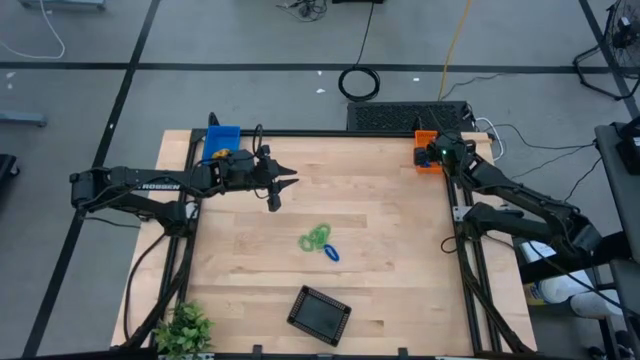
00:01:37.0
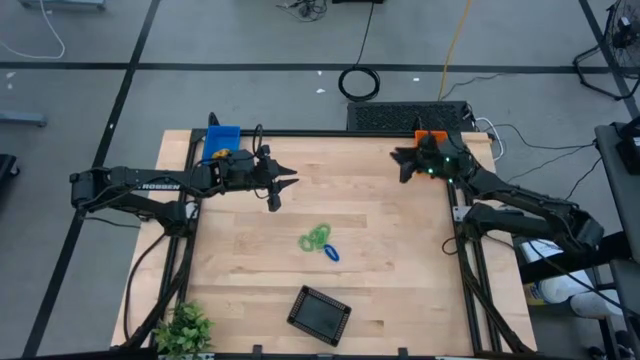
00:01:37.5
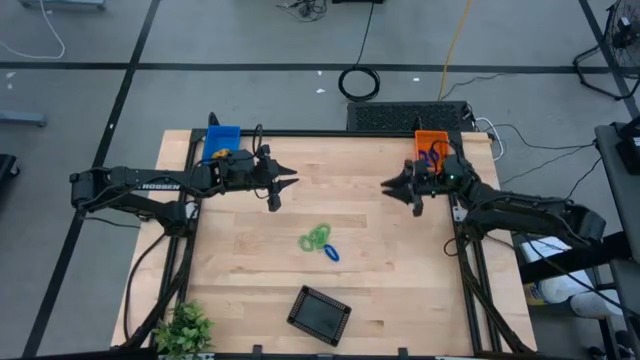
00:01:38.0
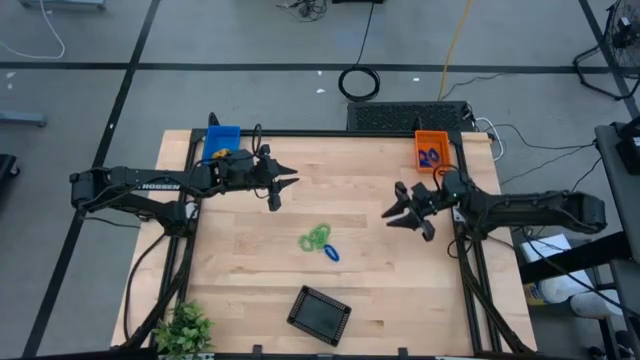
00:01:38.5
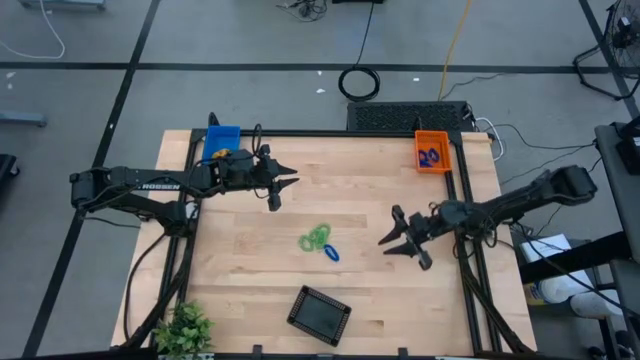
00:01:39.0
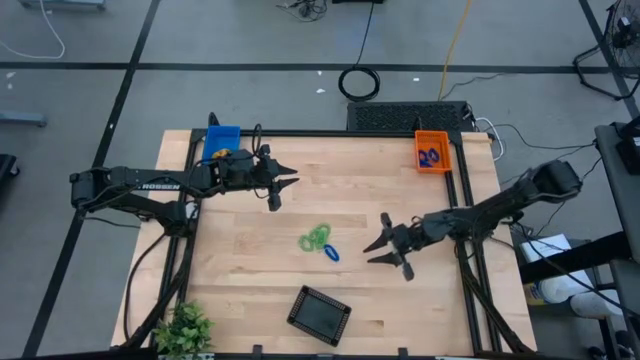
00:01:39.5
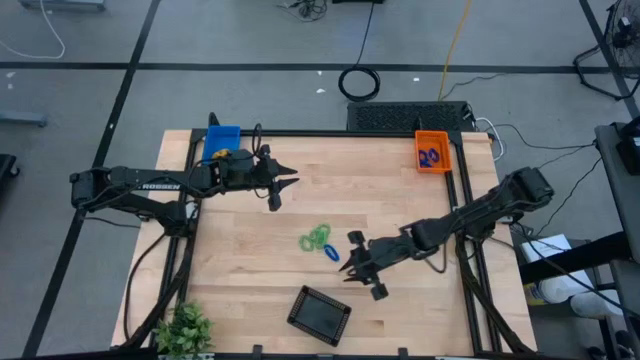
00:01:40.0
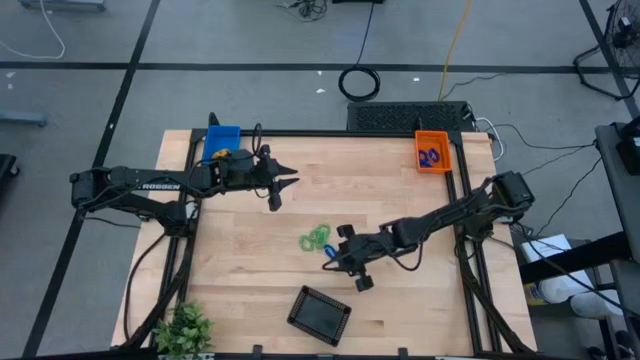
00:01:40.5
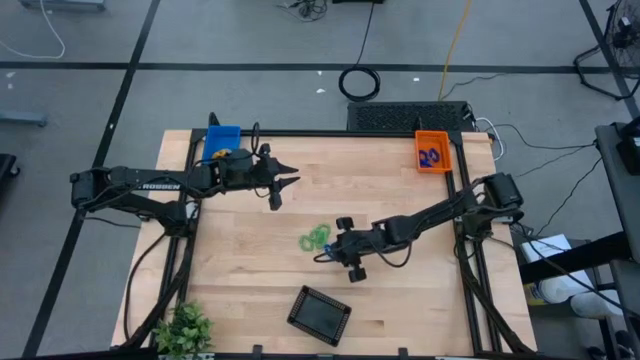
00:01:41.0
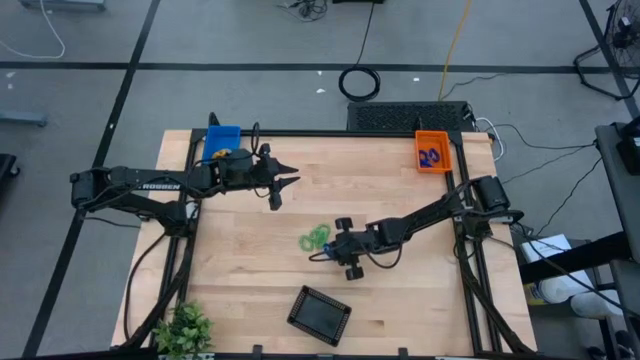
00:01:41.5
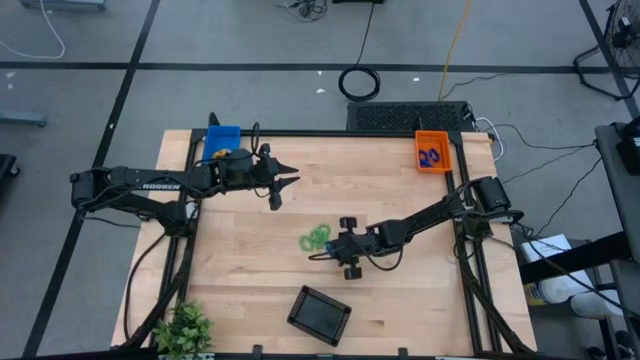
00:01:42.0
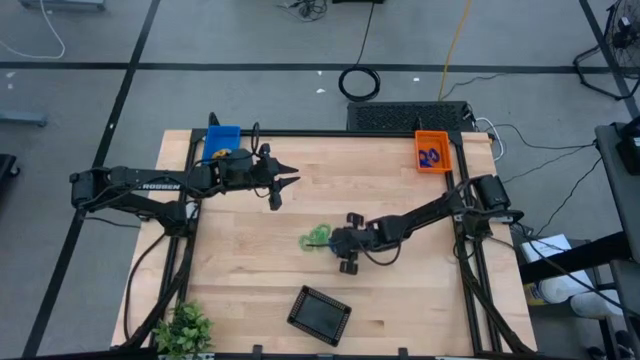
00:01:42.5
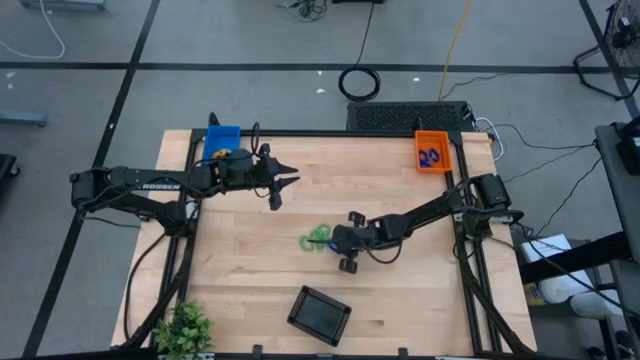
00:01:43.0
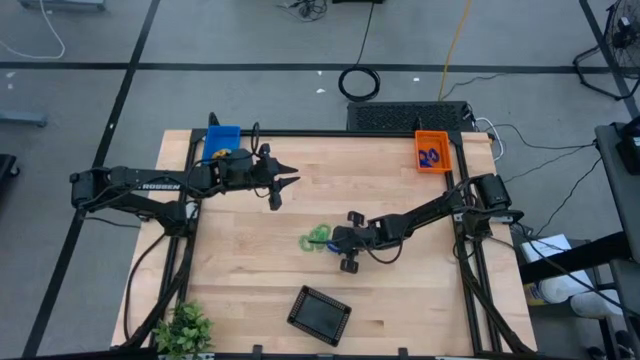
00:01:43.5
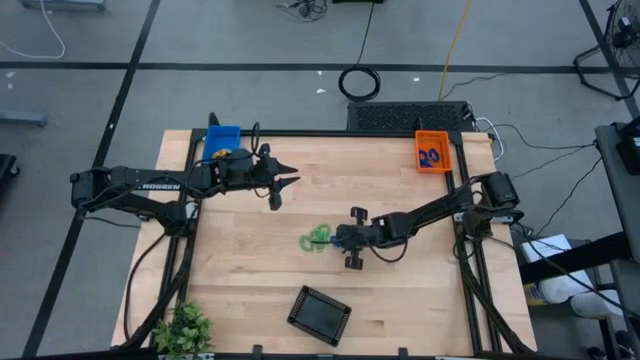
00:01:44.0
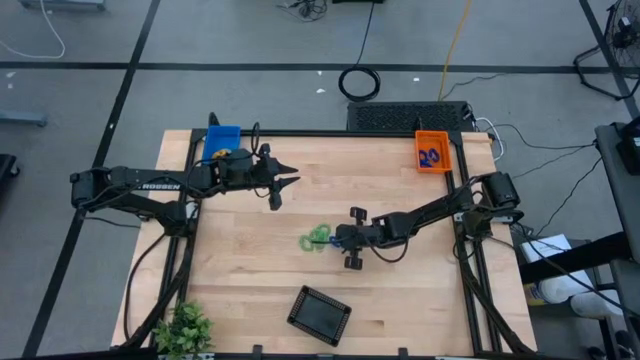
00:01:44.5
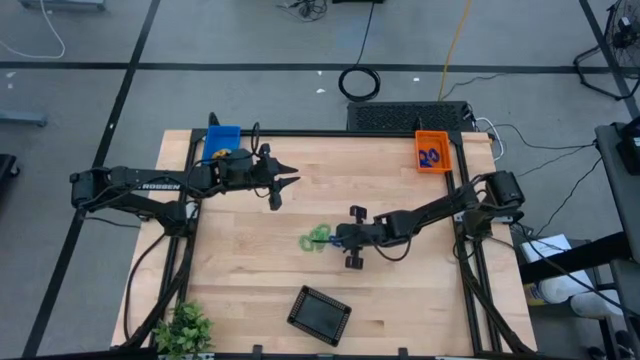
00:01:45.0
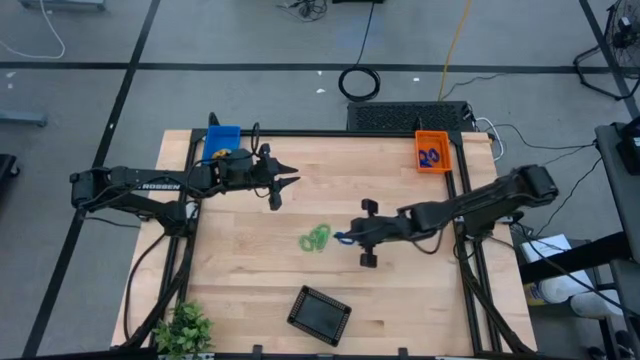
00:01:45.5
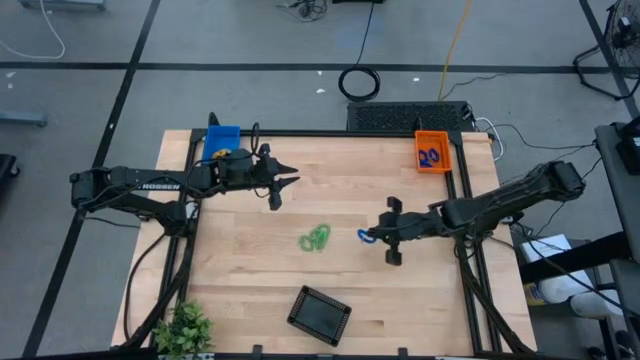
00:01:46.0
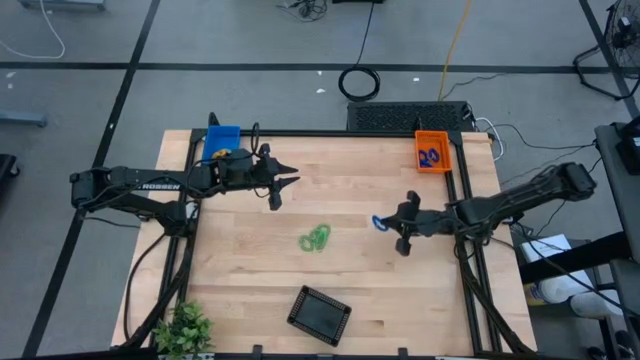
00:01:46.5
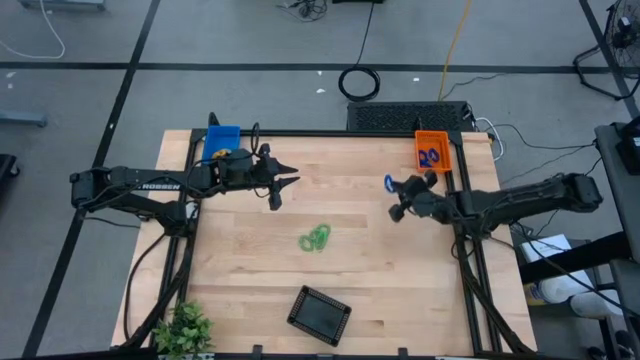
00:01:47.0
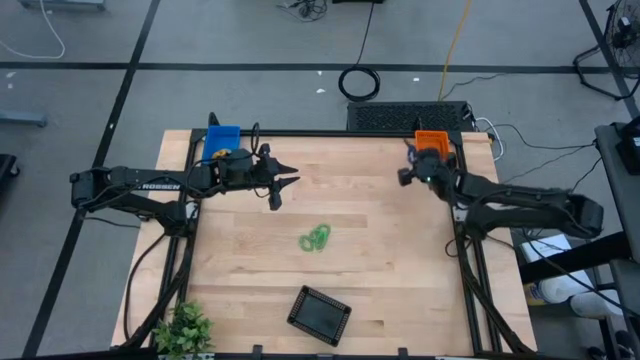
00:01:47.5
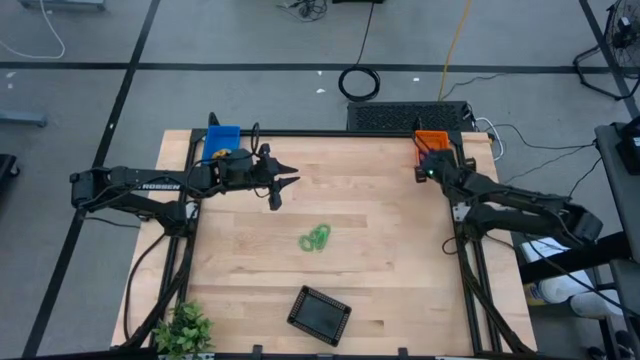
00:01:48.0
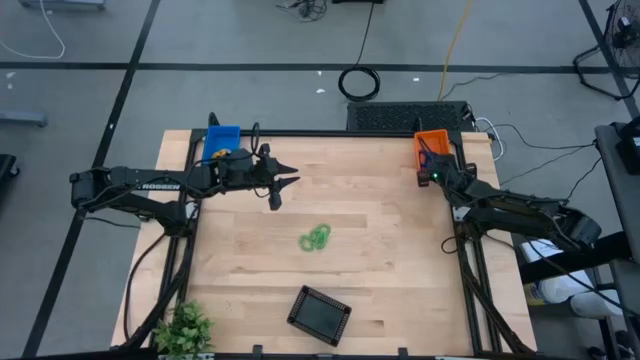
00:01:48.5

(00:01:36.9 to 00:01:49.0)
Task: Sort spring keychains into baskets
Put the blue spring keychain into the orange basket

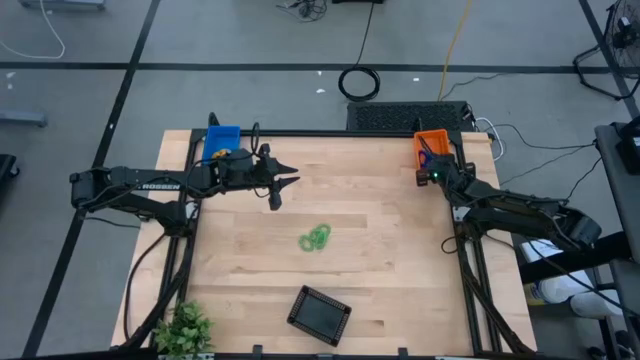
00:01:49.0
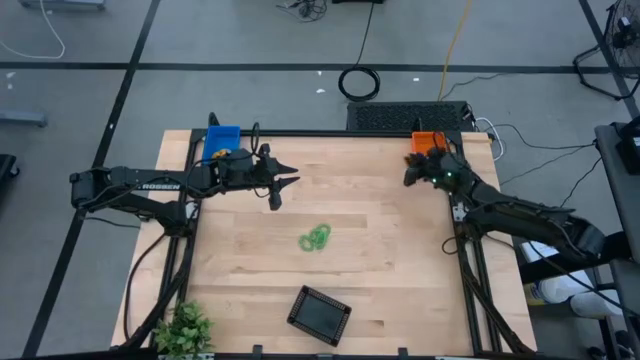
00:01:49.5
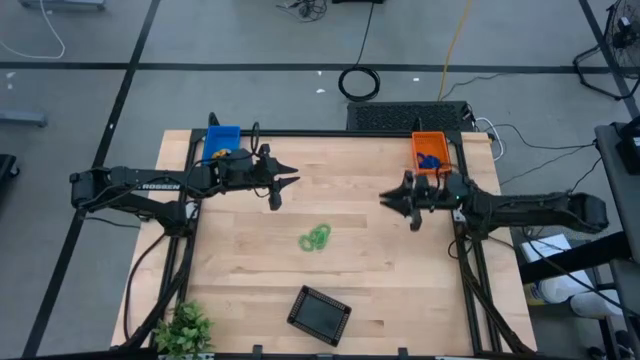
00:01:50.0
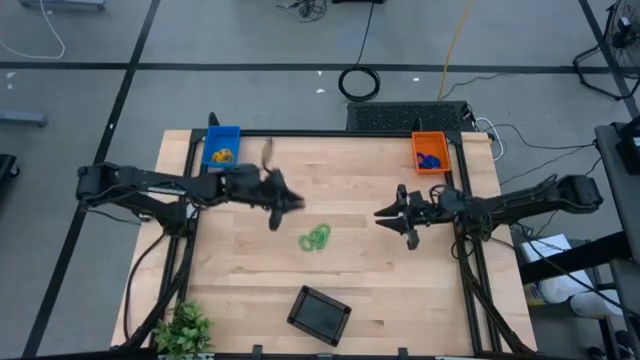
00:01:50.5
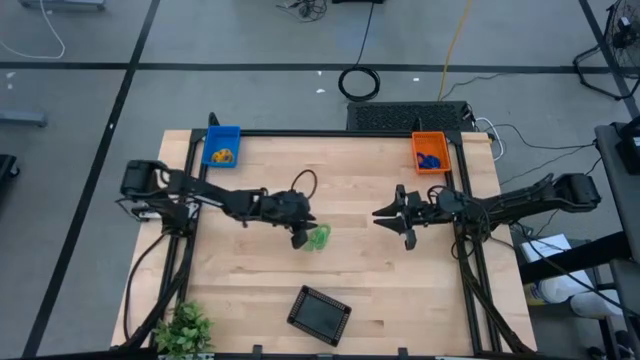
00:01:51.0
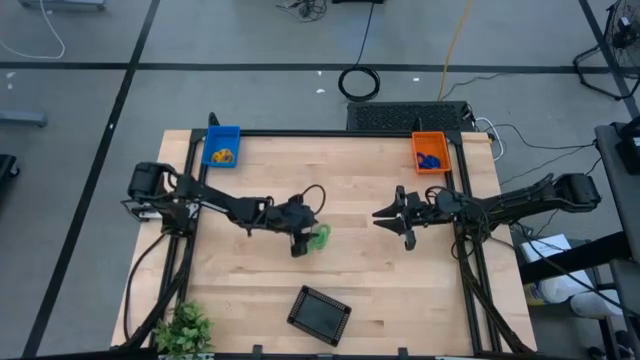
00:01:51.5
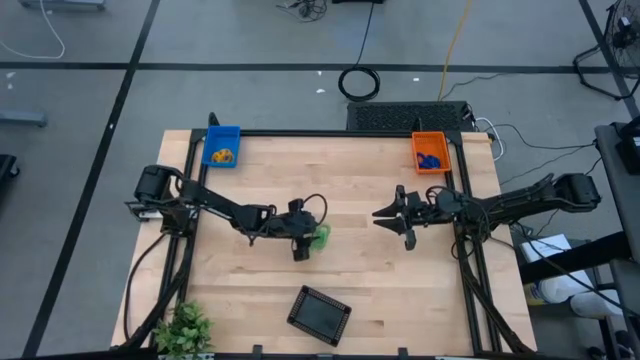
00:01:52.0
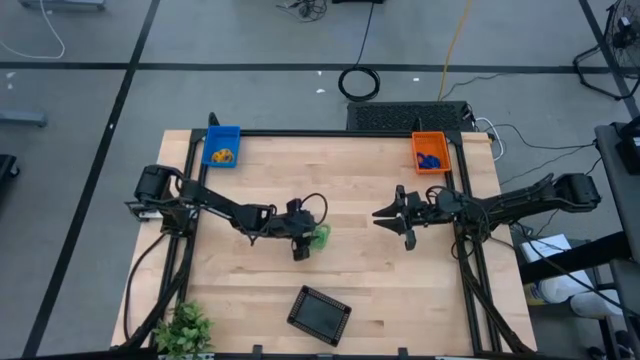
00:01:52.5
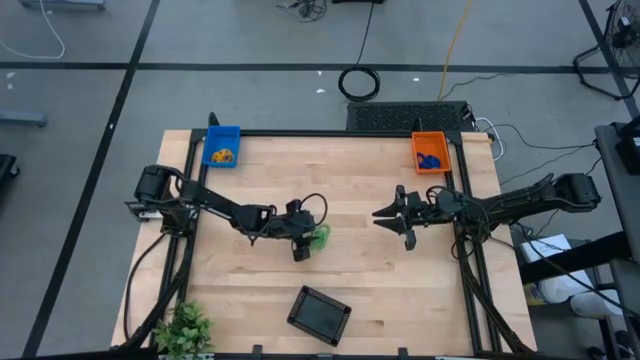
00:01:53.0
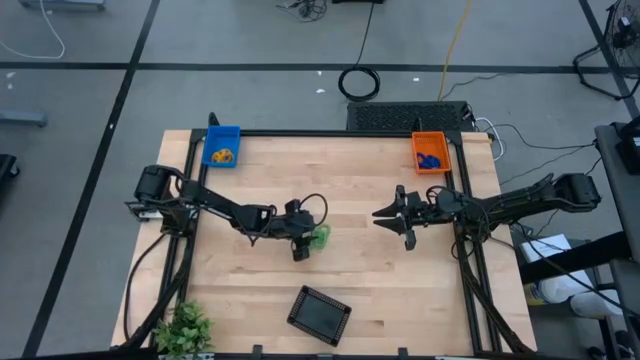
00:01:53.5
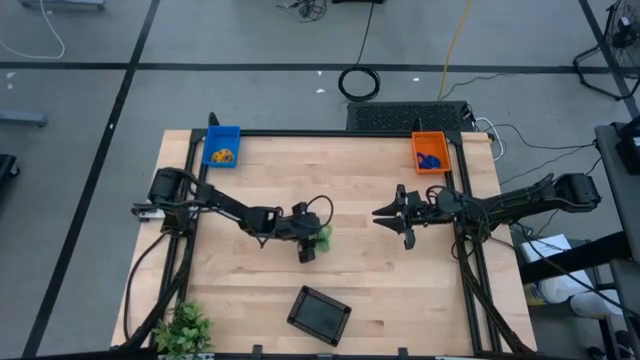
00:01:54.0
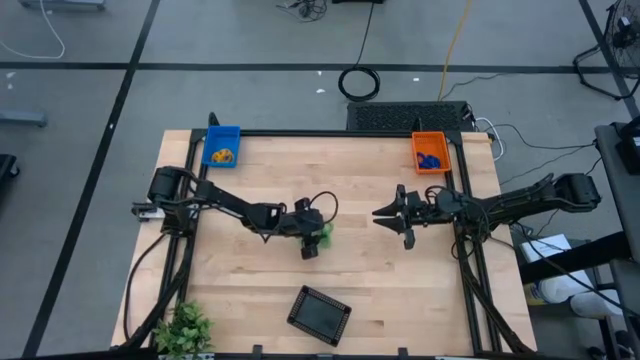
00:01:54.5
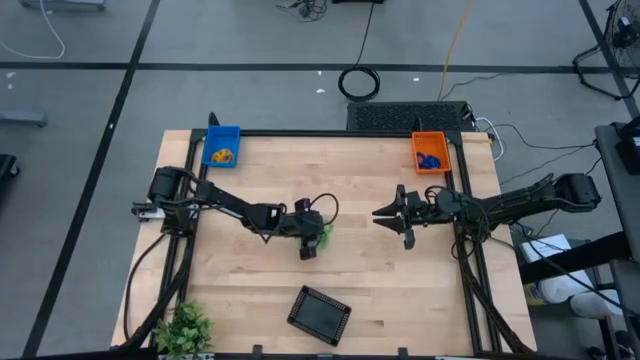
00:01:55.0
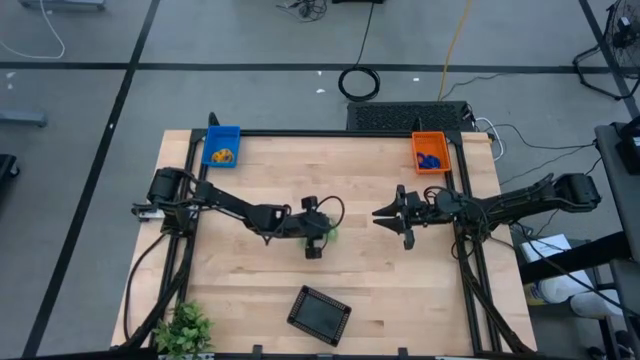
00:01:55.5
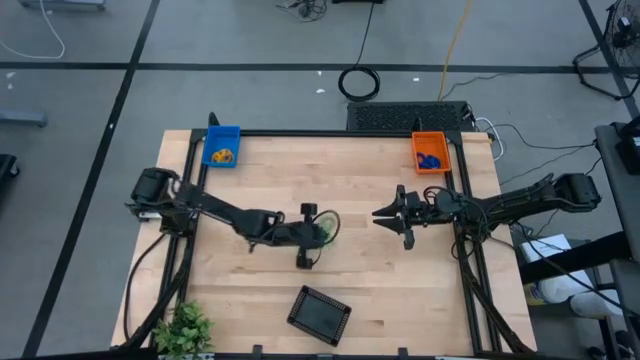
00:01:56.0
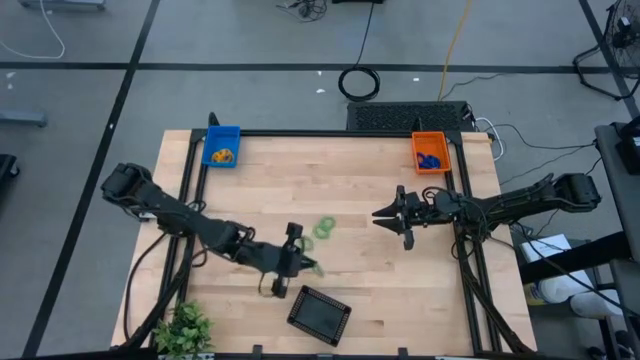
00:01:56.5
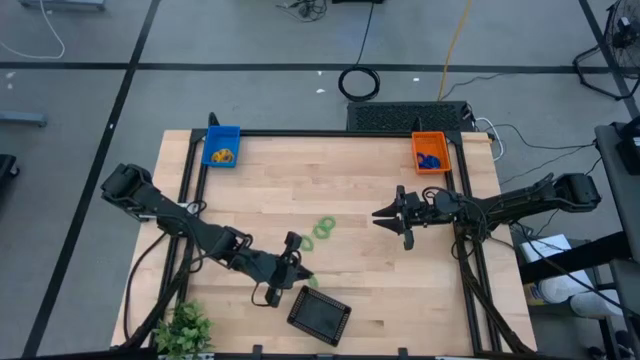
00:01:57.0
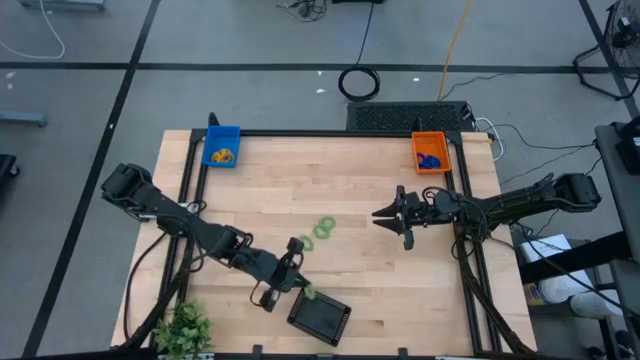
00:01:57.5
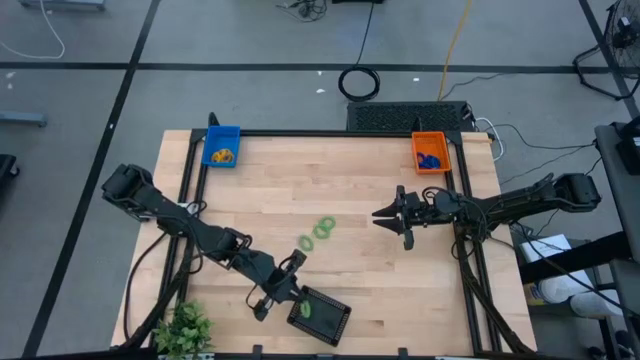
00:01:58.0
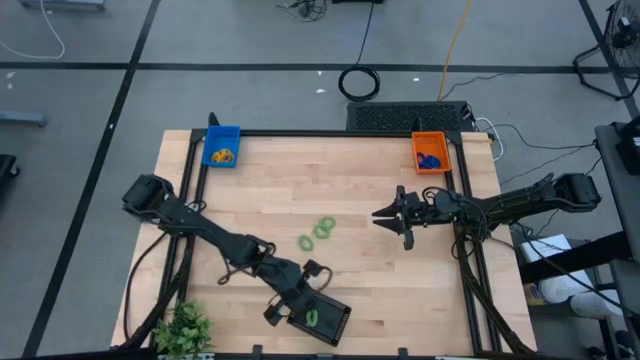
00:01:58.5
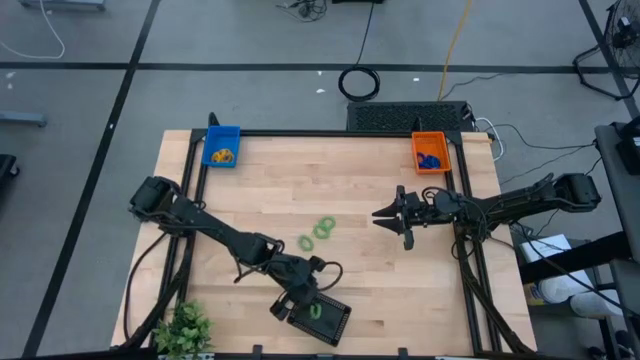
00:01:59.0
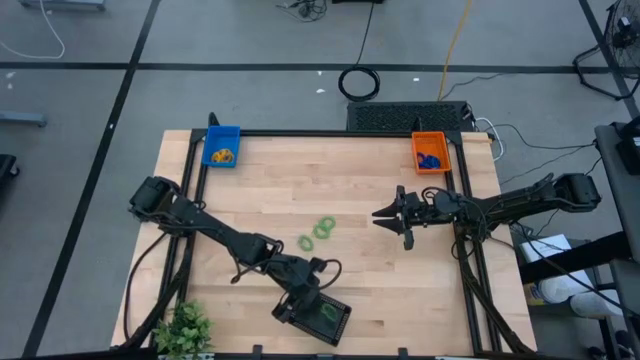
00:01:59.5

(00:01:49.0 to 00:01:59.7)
Put the green spring keychain into the black basket
